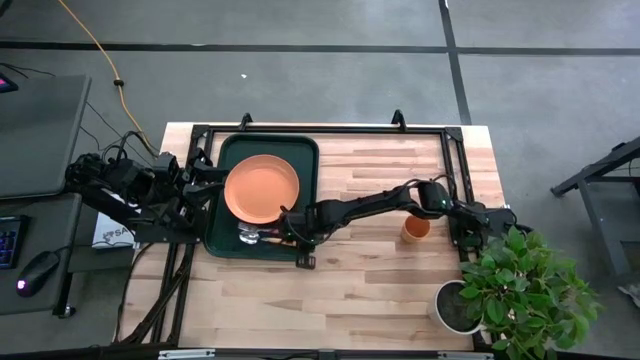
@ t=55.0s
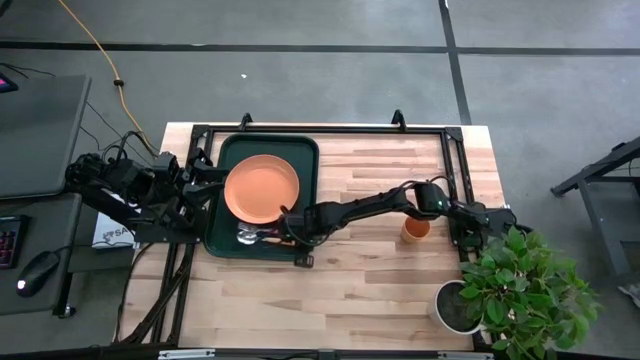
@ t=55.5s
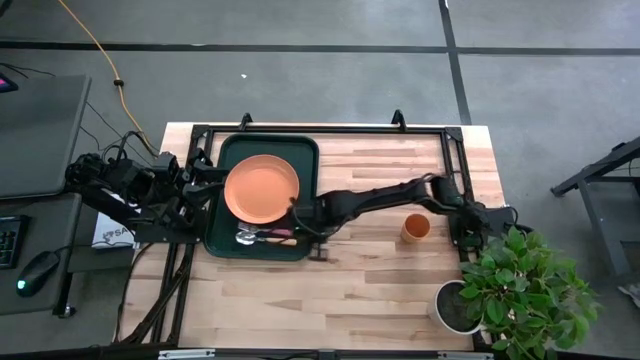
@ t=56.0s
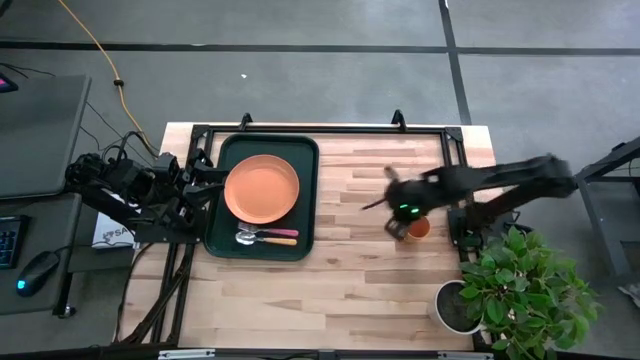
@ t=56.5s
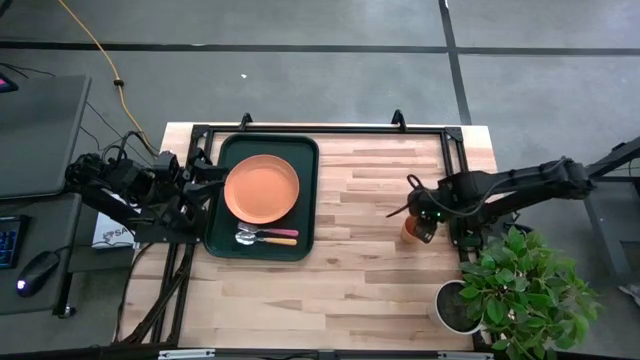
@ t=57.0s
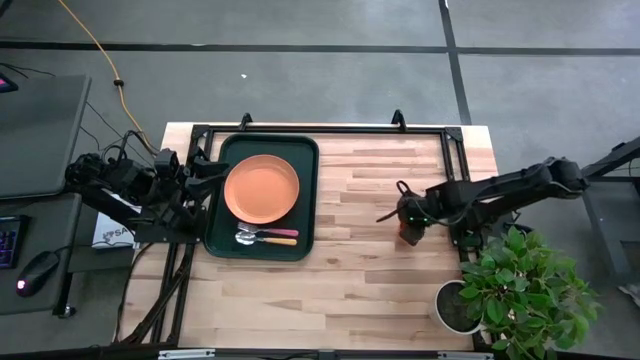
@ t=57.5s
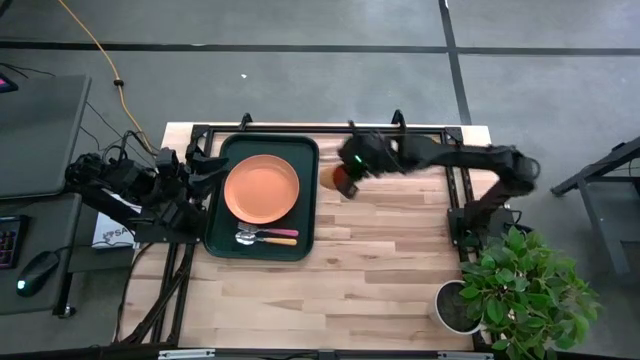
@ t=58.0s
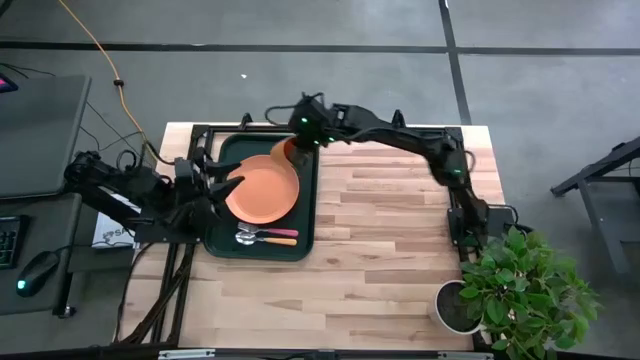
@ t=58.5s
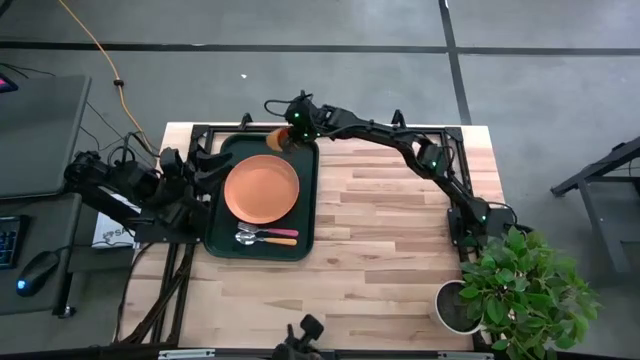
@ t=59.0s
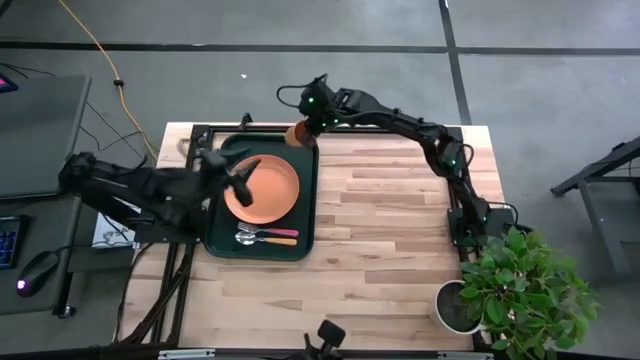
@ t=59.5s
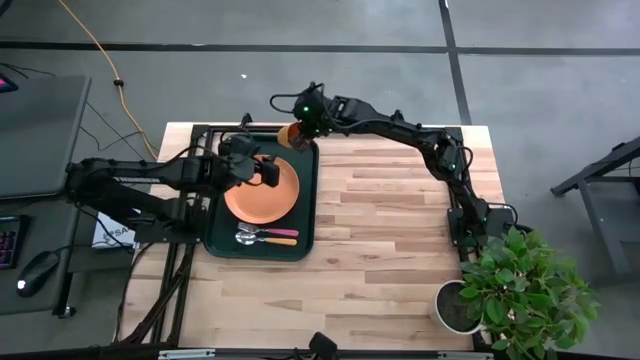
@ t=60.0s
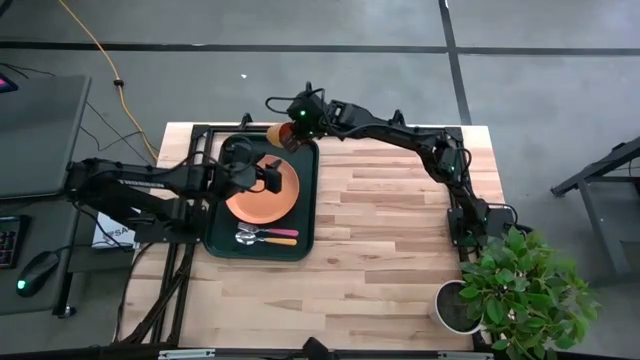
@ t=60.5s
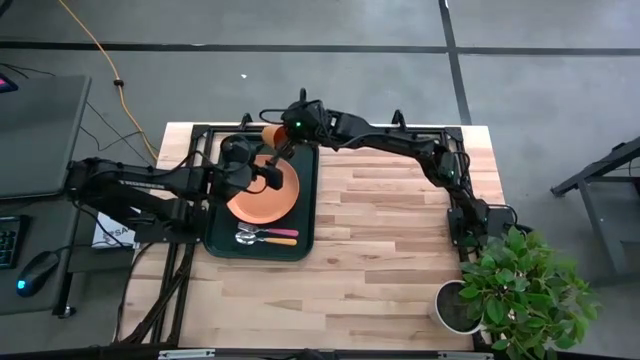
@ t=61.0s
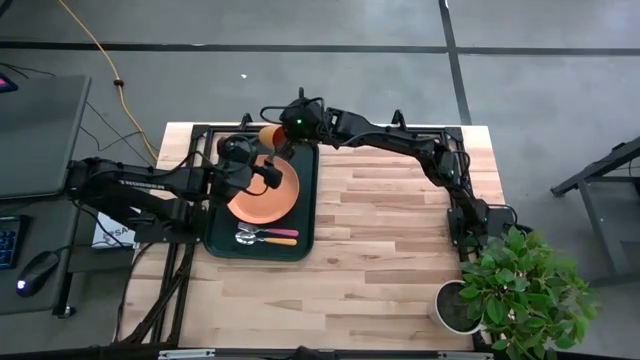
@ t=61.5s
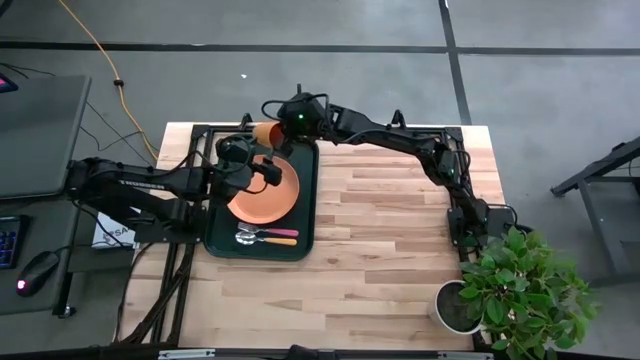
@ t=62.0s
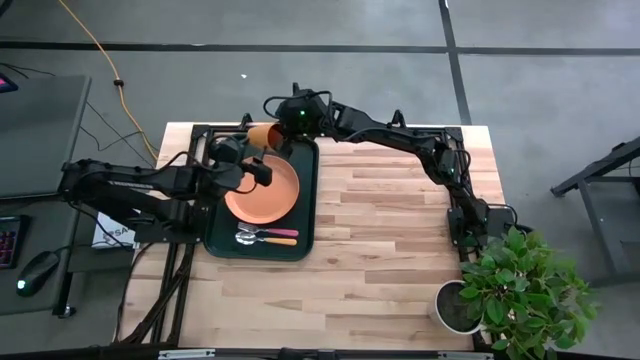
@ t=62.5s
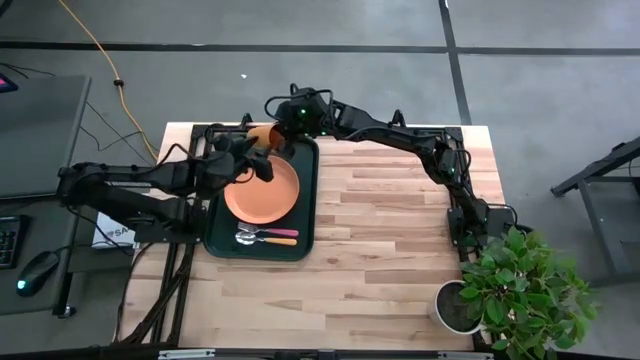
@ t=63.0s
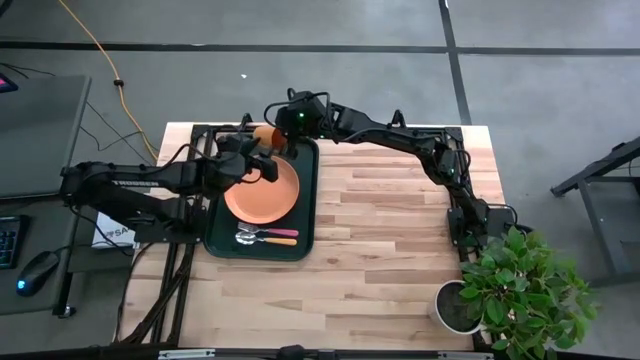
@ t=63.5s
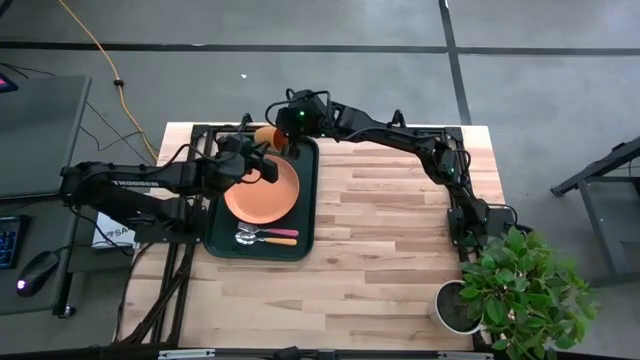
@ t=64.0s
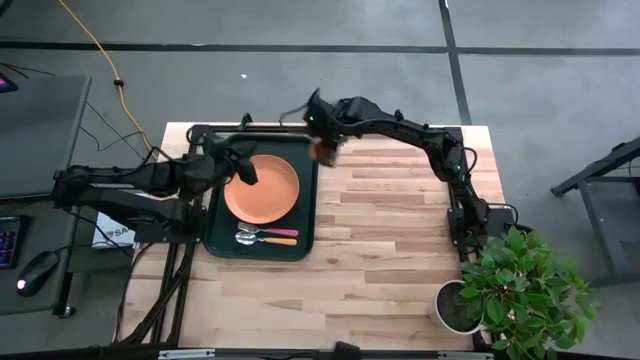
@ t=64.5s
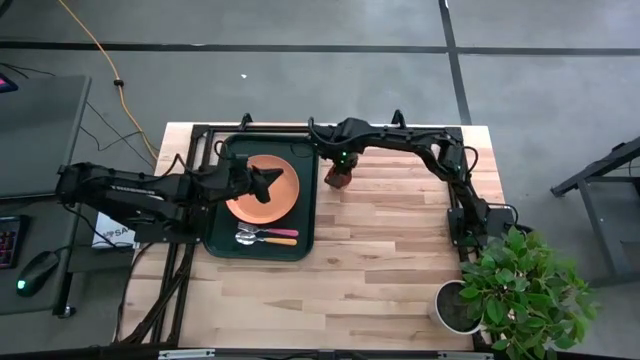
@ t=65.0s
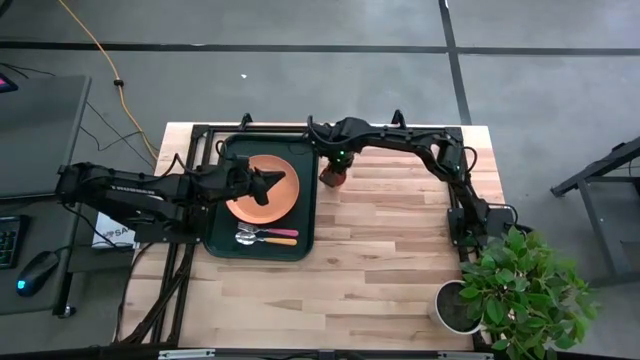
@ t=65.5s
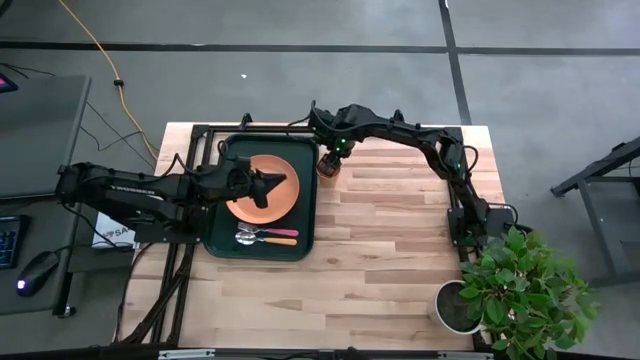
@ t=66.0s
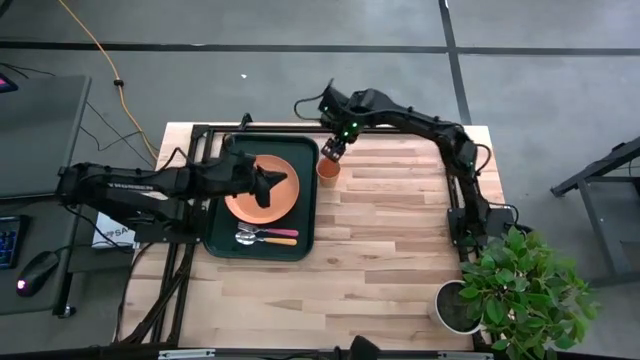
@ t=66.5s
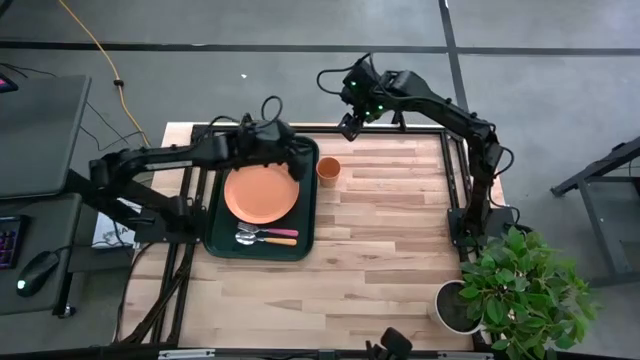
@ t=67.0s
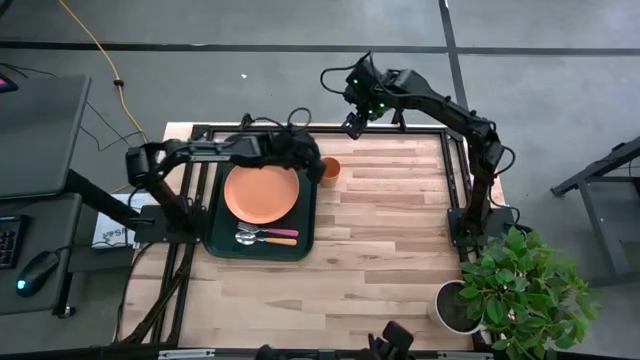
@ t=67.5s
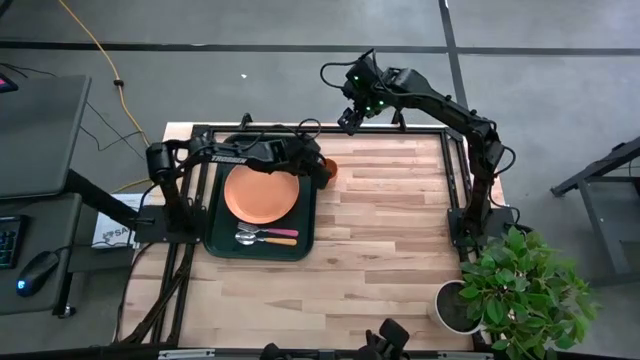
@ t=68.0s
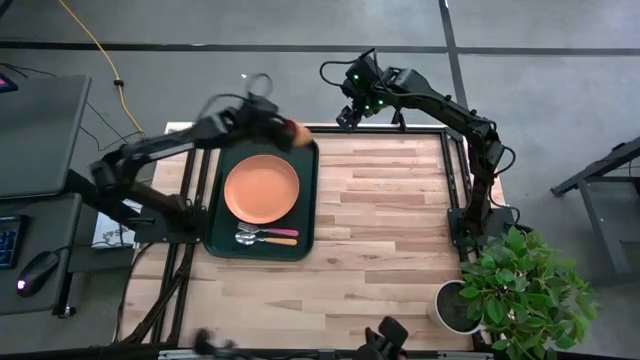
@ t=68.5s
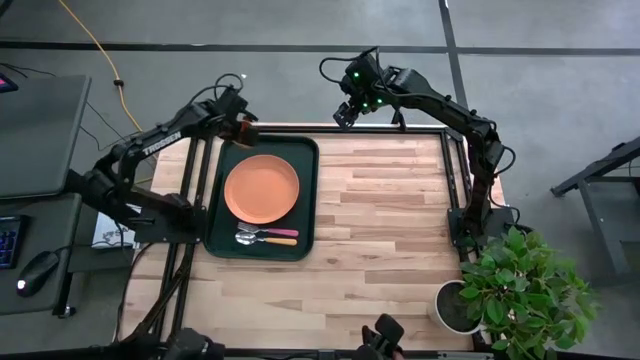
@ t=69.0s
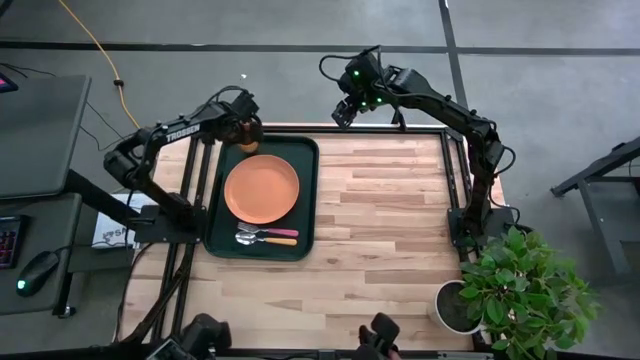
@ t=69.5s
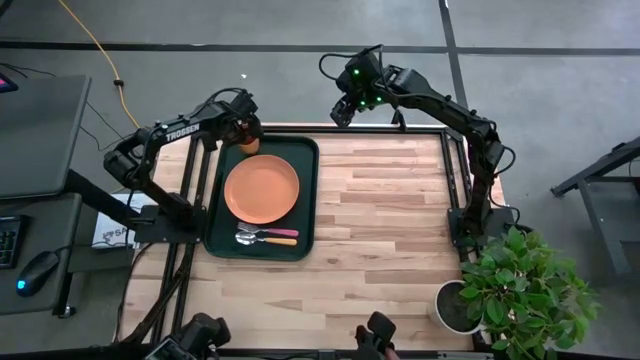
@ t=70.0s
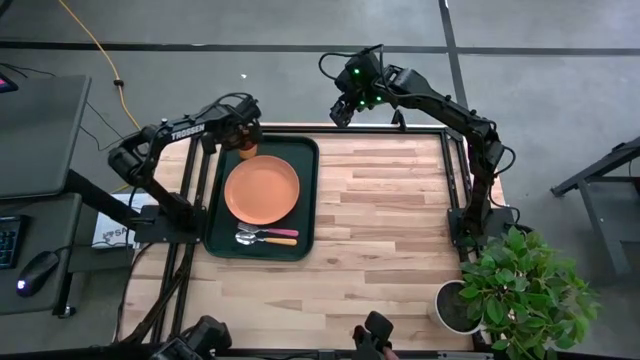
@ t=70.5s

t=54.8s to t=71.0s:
Task: Pick and place plate/cup/fork/spoon on tray
Put the orange cup on the black serving tray to the top right of the orange plate

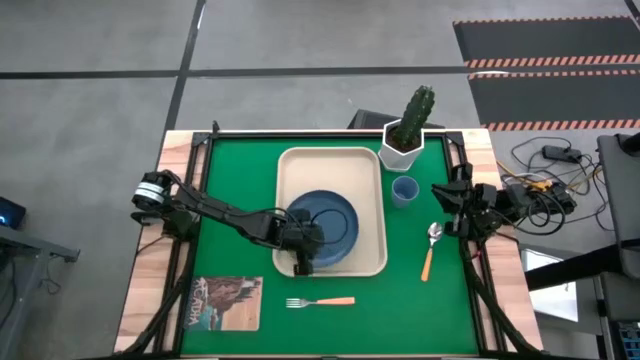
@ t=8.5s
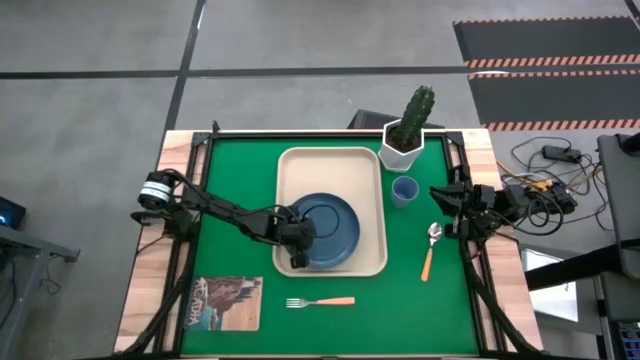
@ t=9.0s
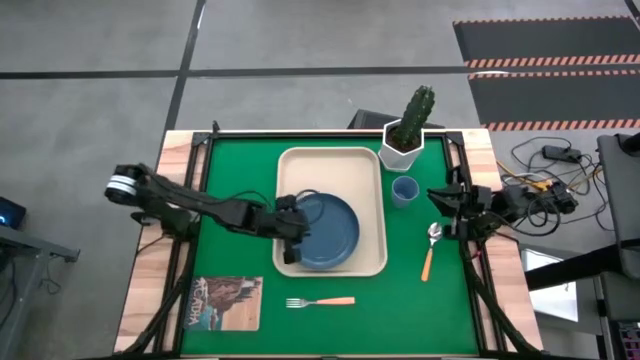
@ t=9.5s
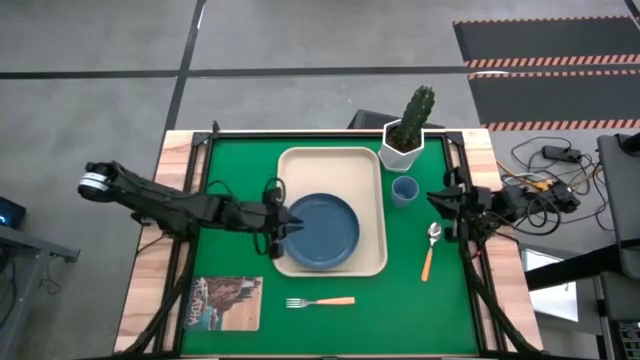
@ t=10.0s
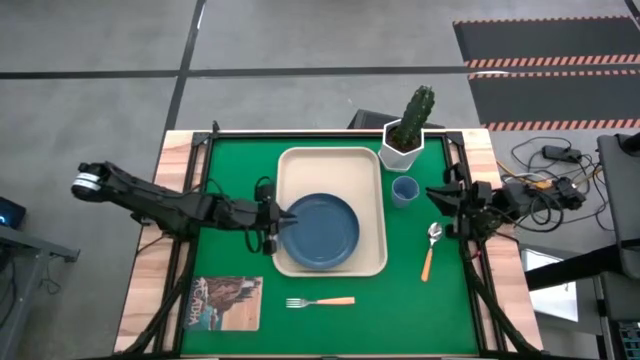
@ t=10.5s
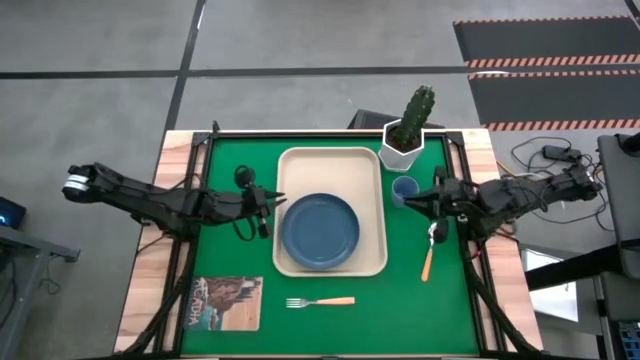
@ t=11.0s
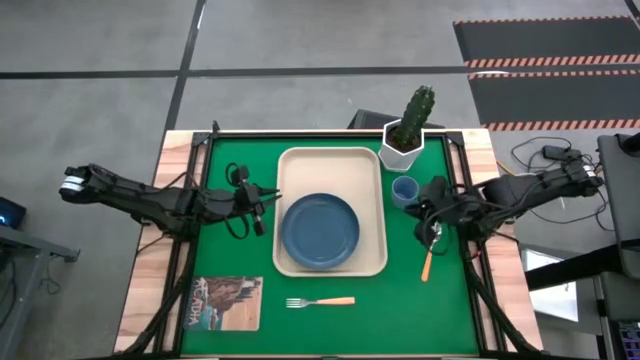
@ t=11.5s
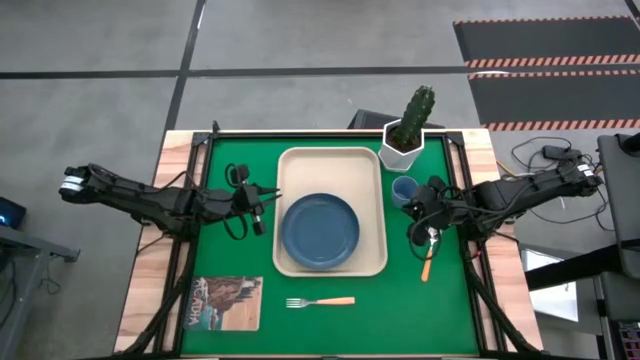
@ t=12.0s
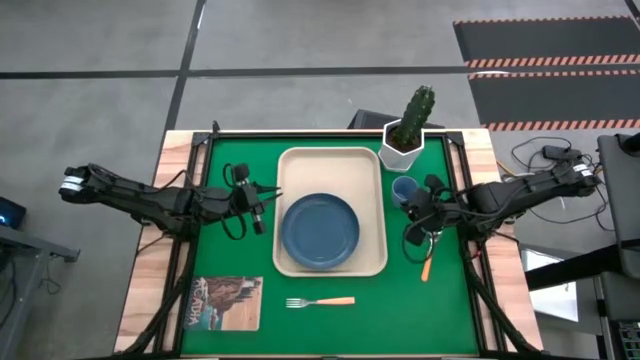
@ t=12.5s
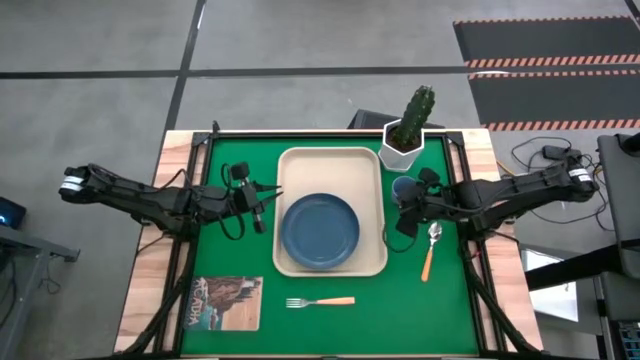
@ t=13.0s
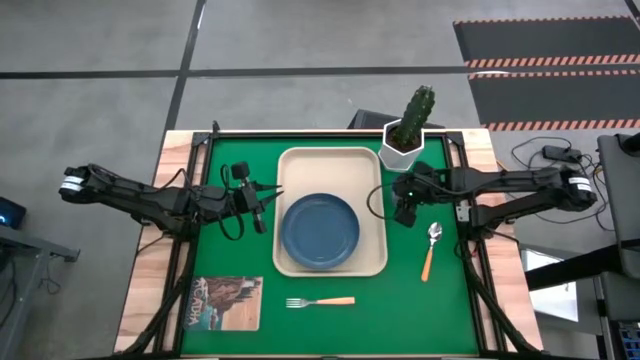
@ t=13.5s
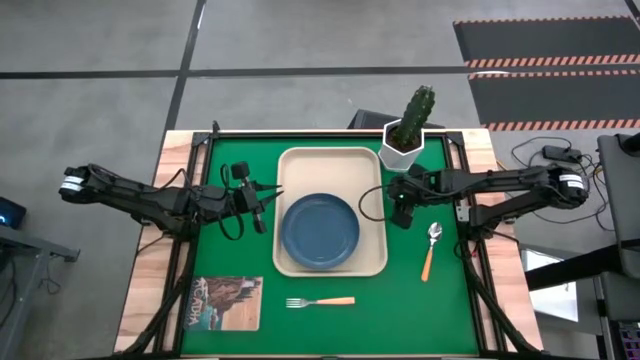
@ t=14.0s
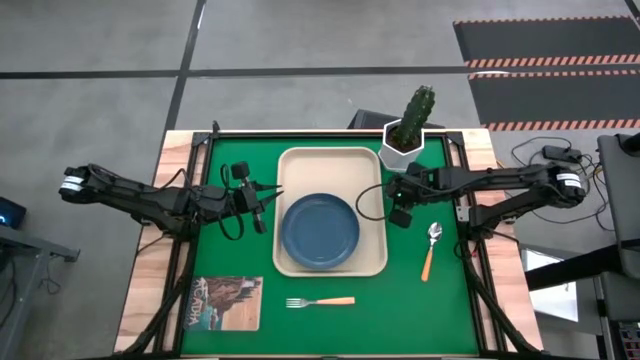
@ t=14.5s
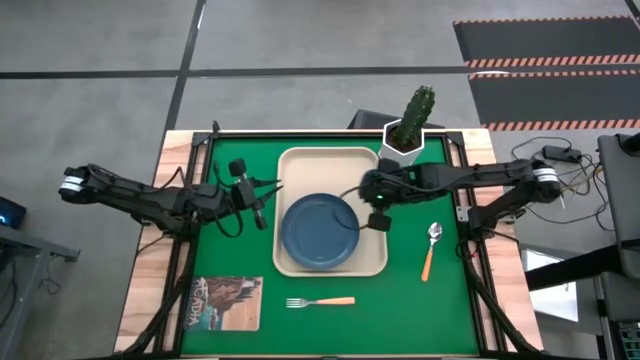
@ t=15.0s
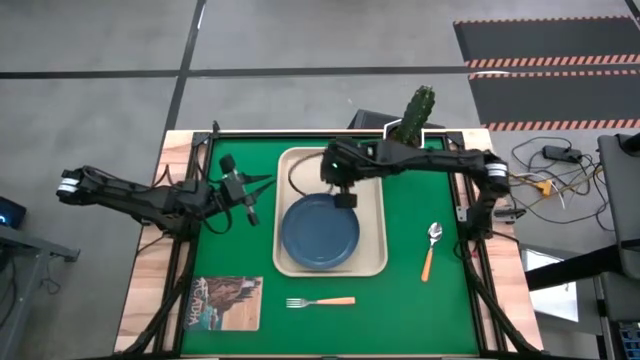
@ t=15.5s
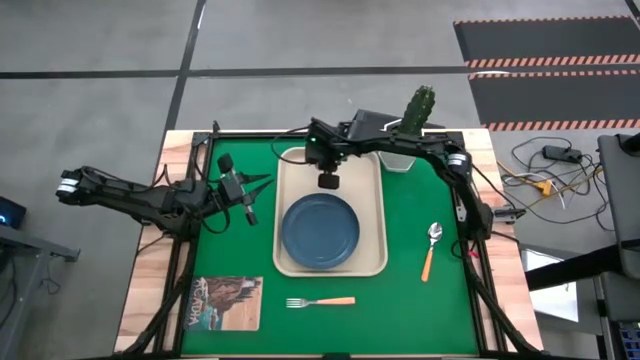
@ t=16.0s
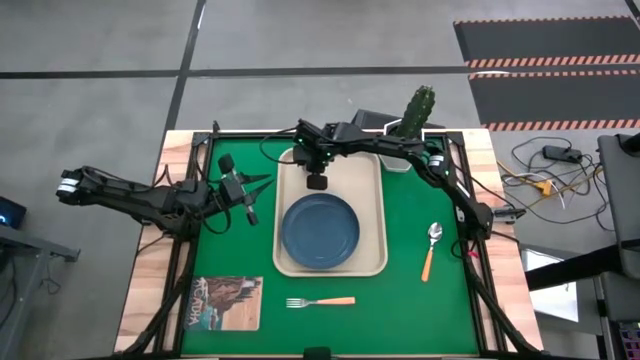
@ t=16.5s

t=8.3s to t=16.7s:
Task: Pick and place plate/cup/fork/spoon on tray
Put the cup on the tray
